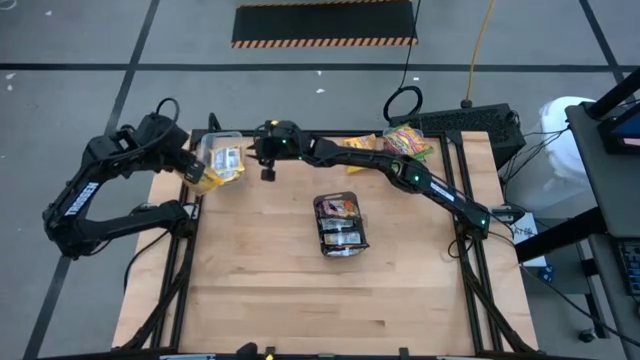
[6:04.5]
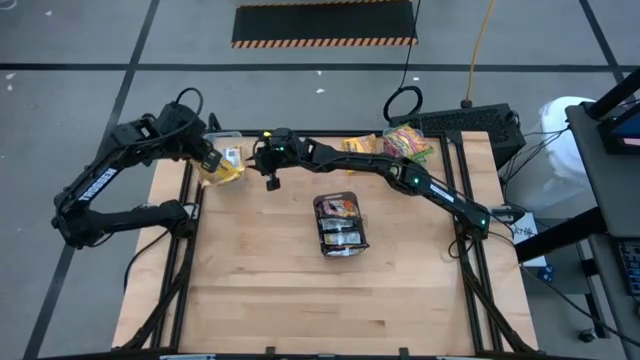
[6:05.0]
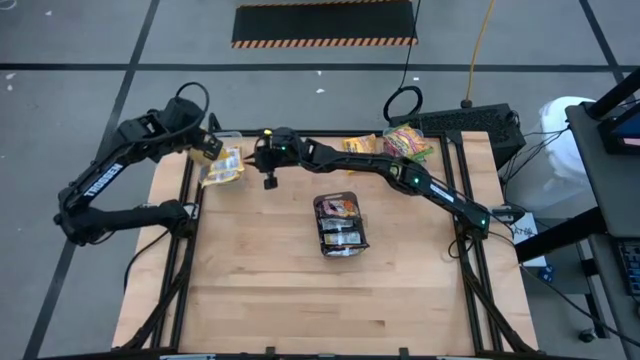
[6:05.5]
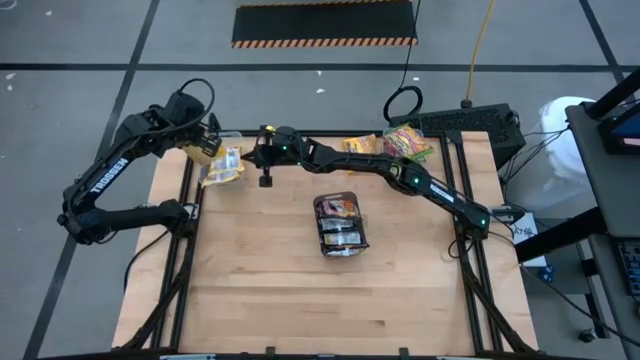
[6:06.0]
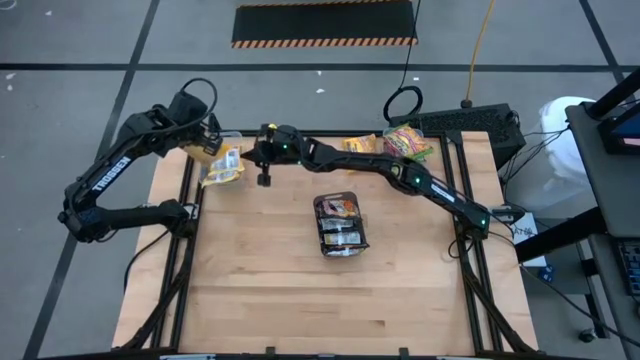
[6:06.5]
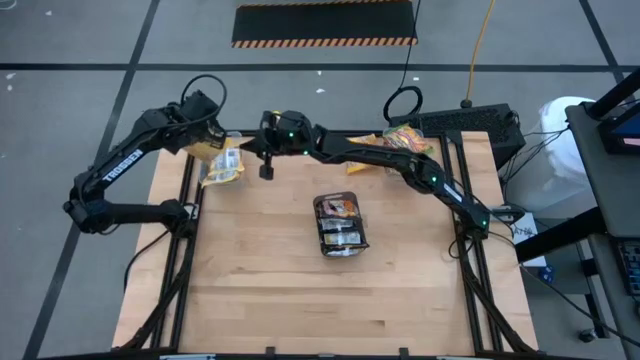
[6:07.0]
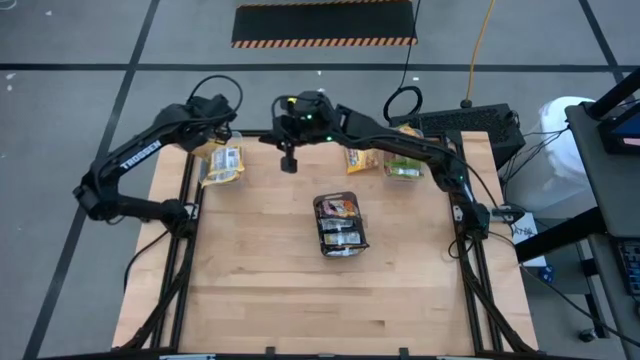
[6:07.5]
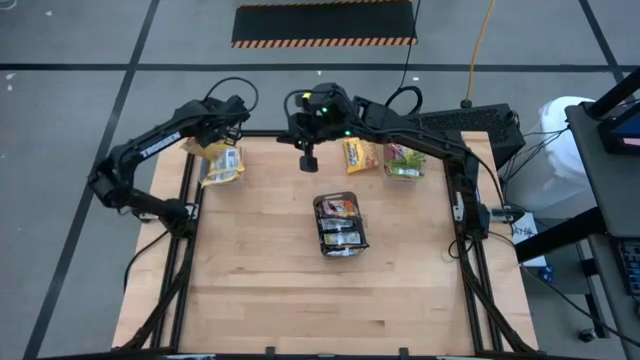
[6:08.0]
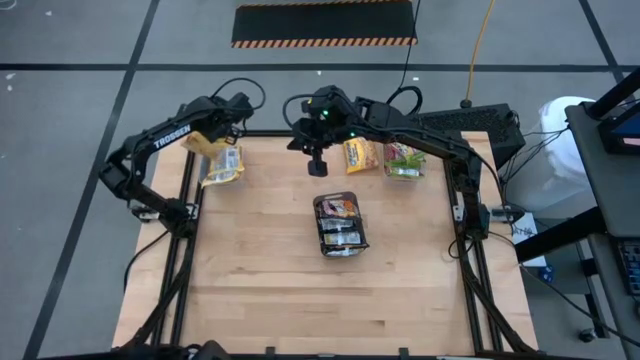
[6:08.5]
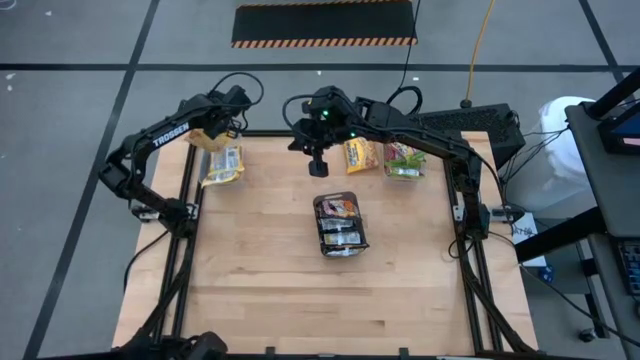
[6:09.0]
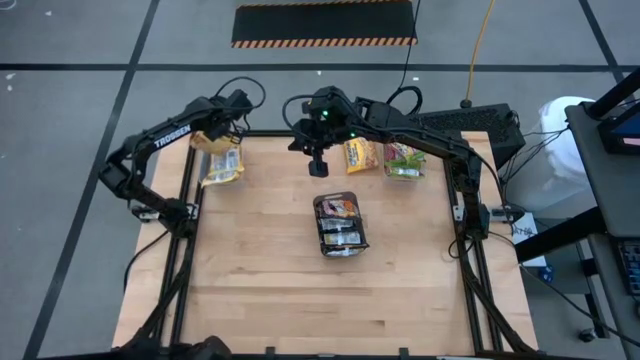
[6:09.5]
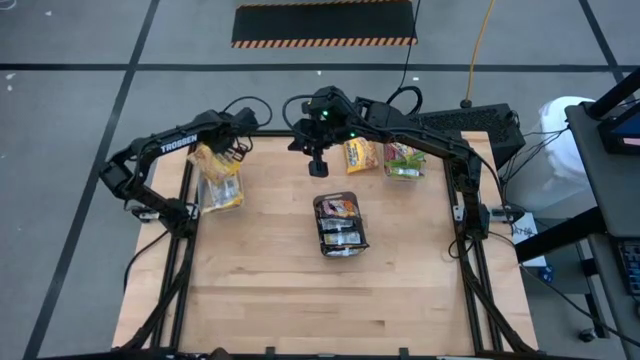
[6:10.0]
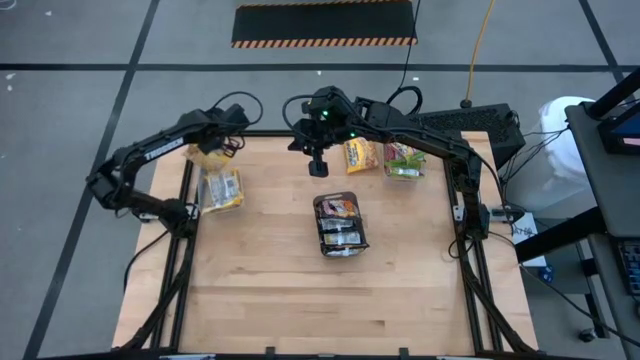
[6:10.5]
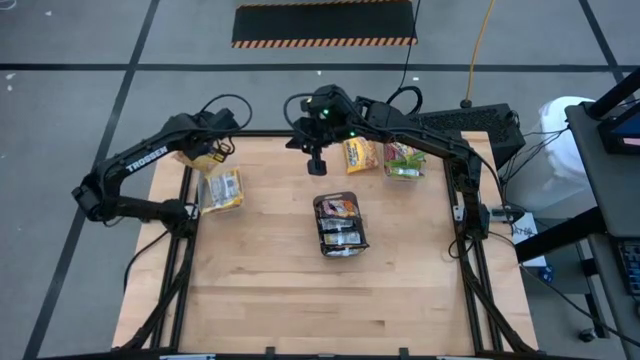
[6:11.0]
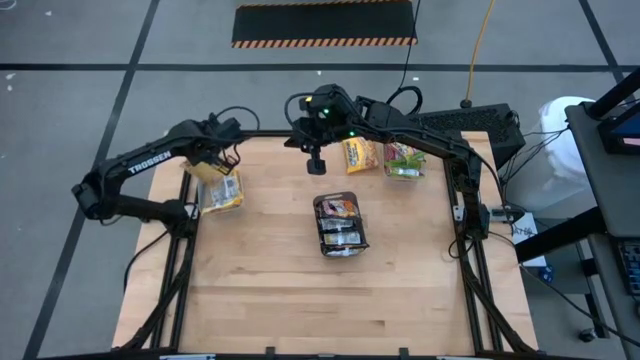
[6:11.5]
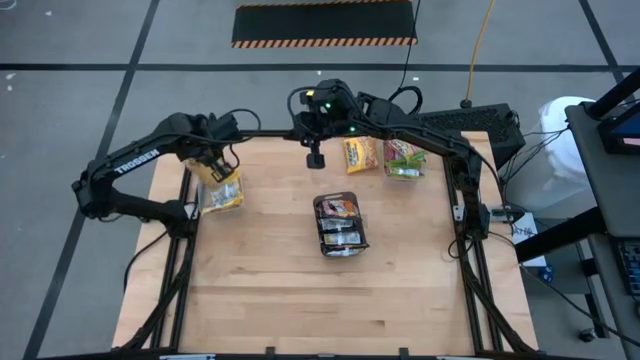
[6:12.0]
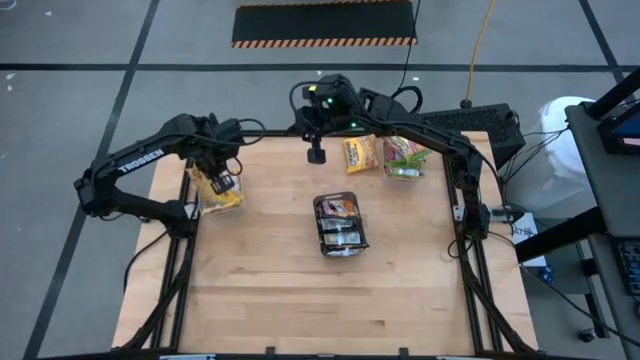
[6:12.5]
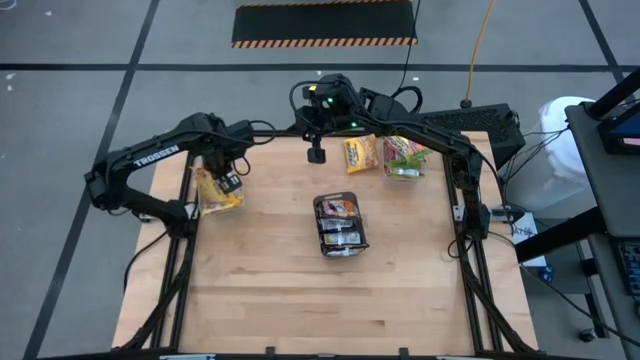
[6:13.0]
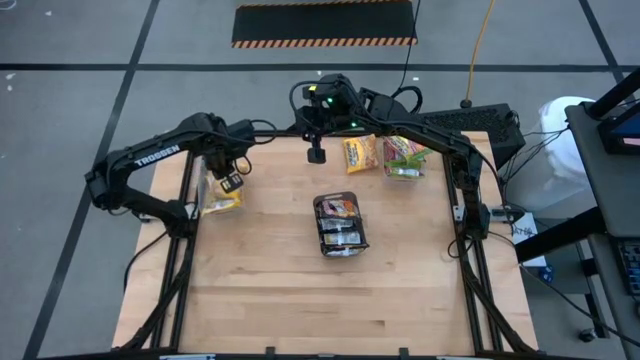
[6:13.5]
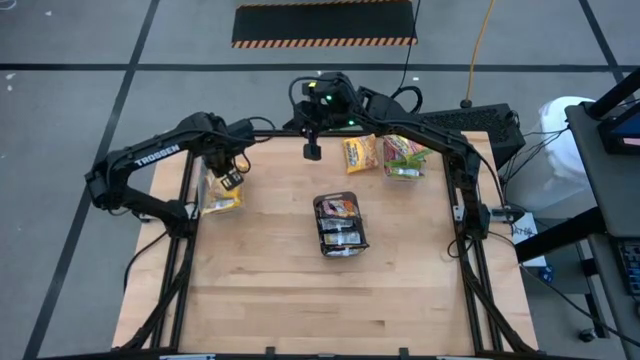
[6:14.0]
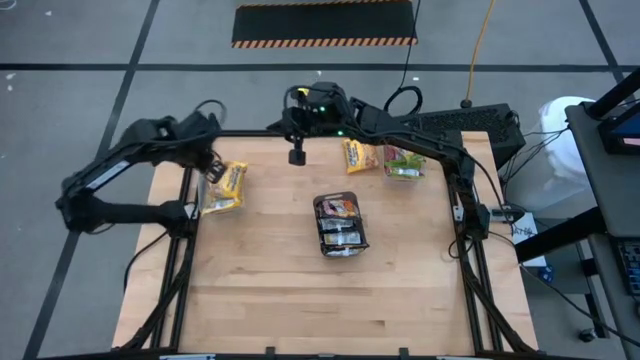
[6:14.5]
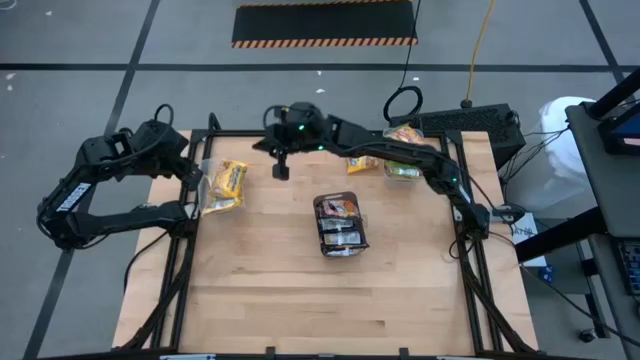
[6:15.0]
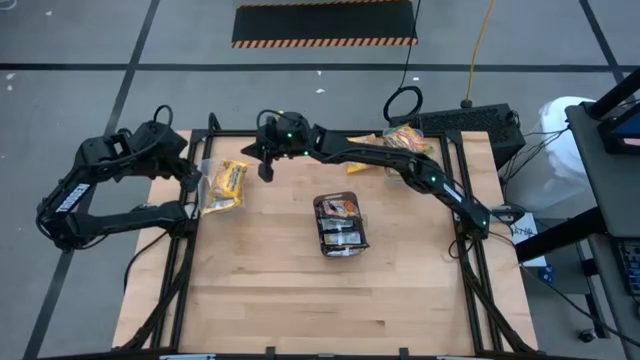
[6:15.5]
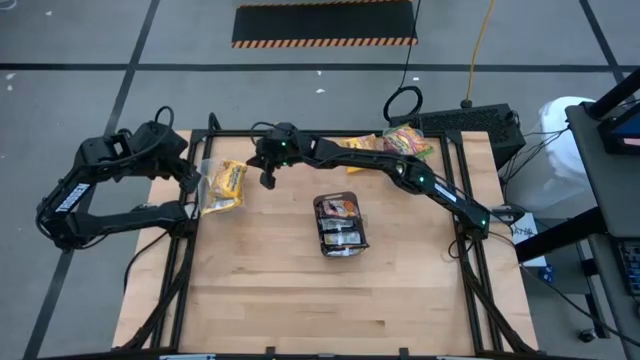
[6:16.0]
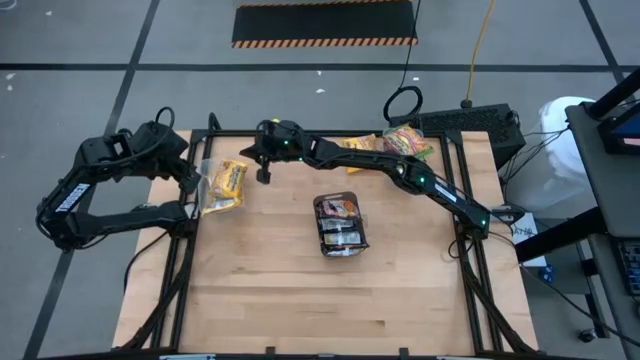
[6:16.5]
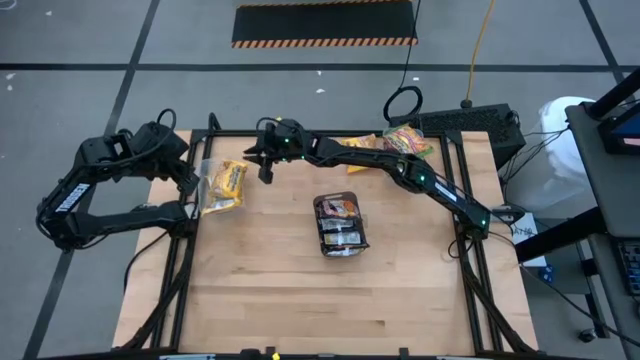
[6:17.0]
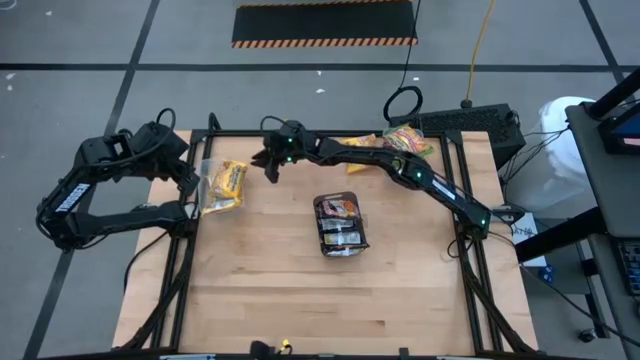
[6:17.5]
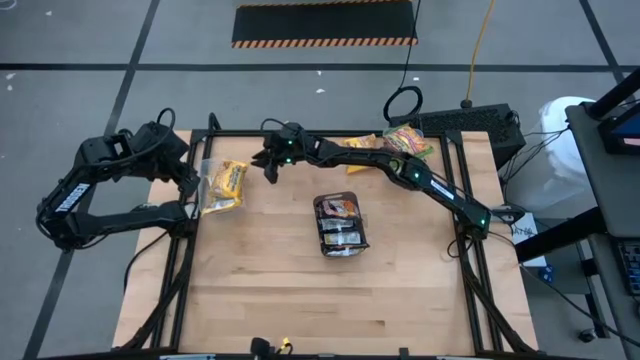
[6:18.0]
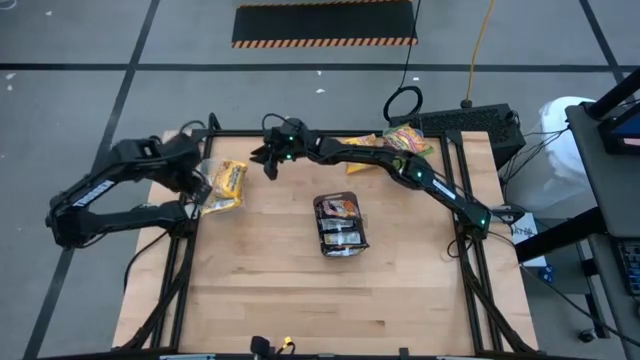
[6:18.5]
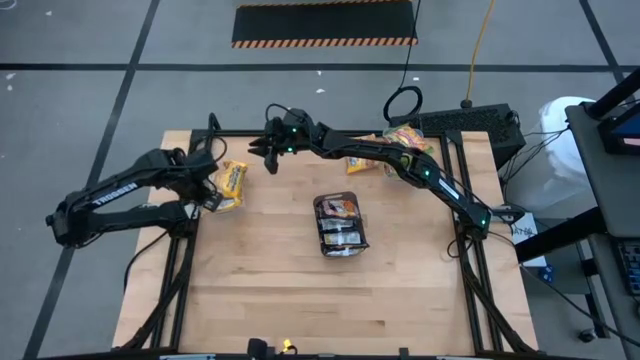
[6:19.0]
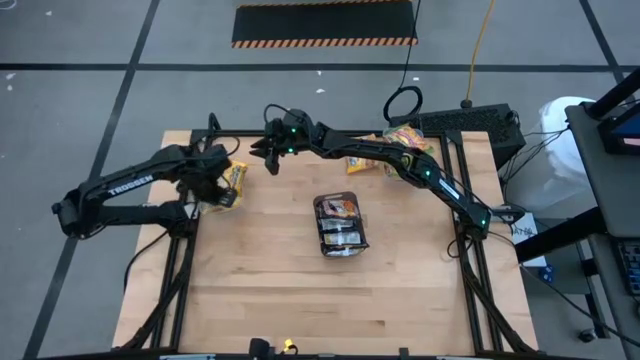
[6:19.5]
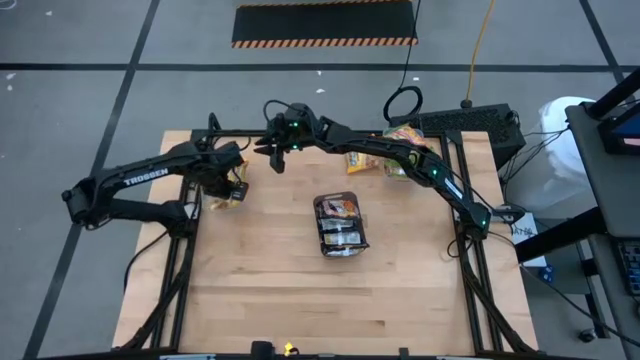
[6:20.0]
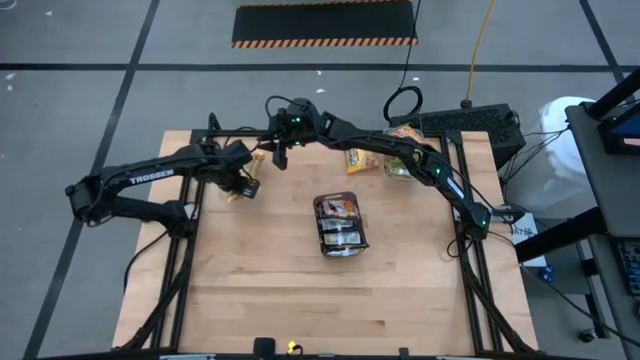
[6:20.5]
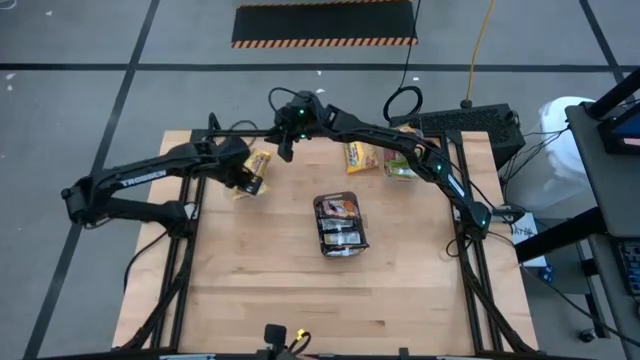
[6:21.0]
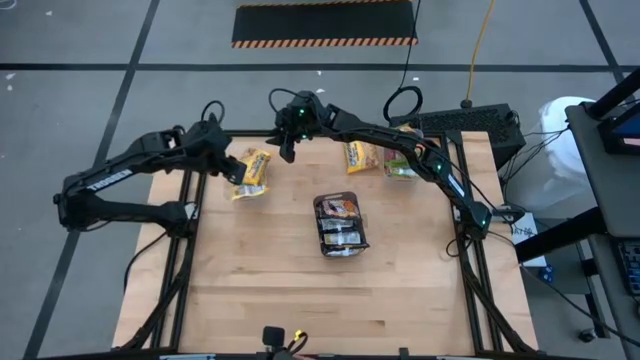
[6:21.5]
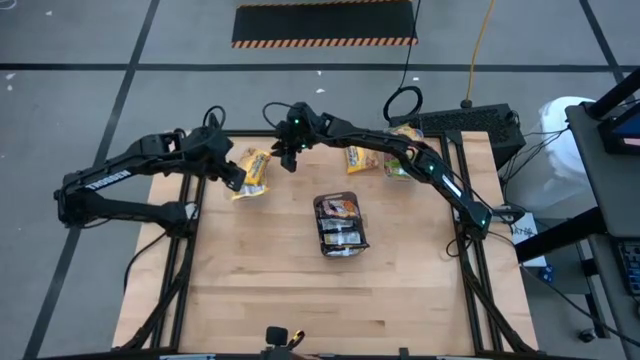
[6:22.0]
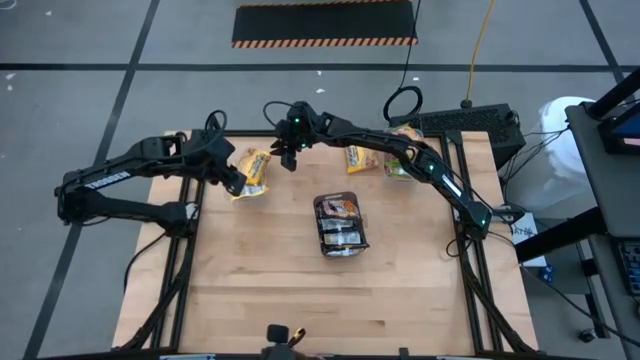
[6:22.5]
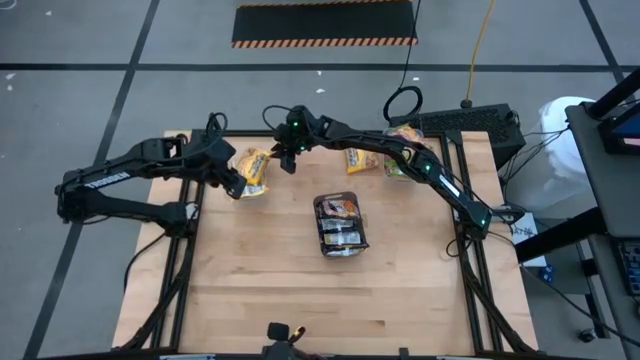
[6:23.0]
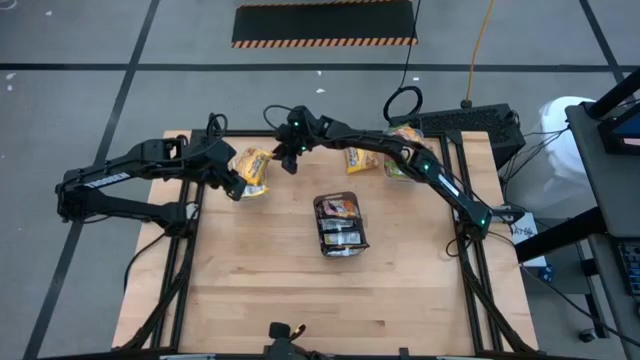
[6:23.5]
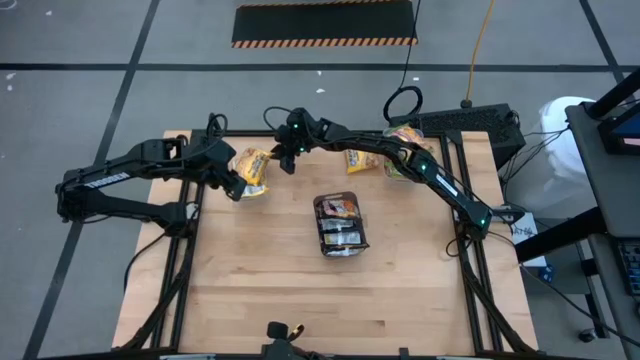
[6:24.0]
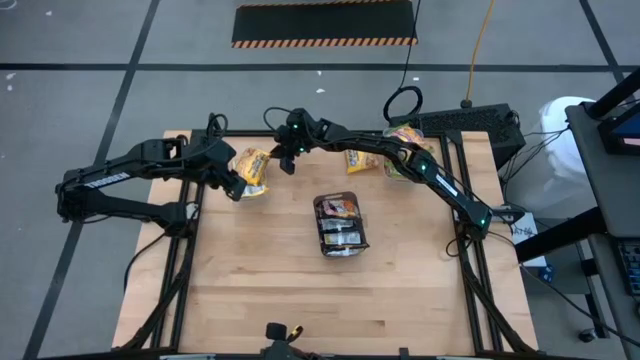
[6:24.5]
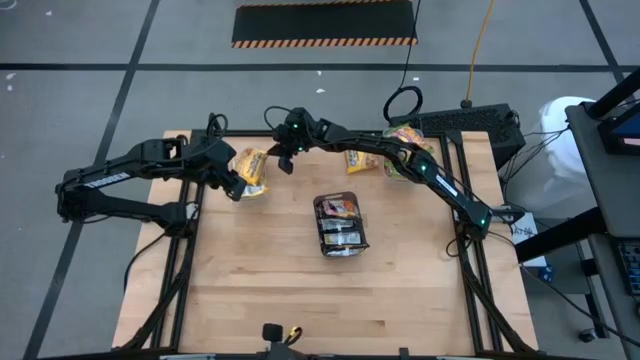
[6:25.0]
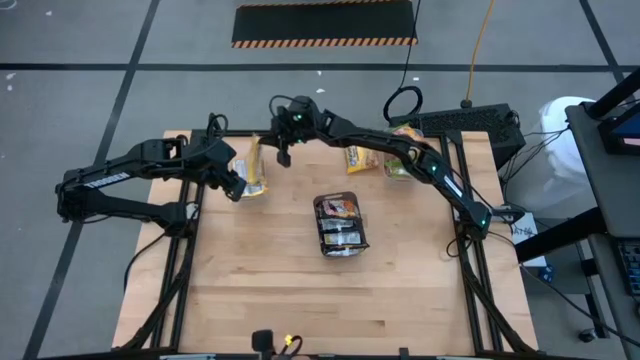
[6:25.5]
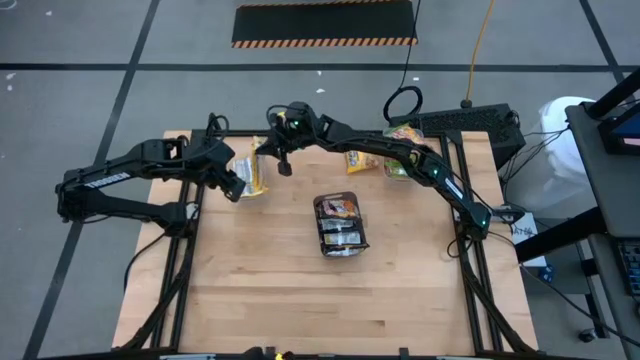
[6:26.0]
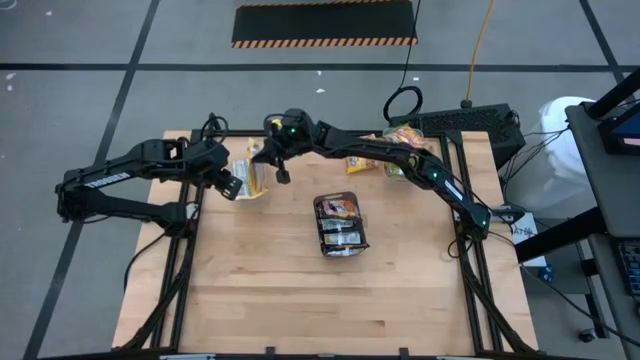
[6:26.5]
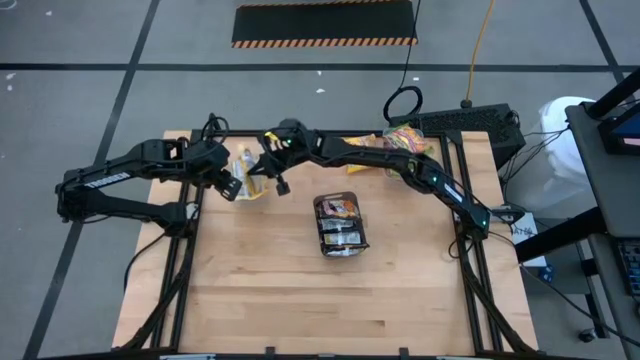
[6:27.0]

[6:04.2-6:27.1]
Task: Sort Maruchan noodles
Put the bottom yellow noodle pack into the left transparent bin
